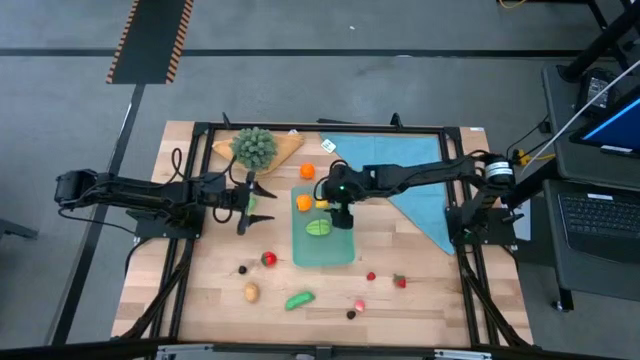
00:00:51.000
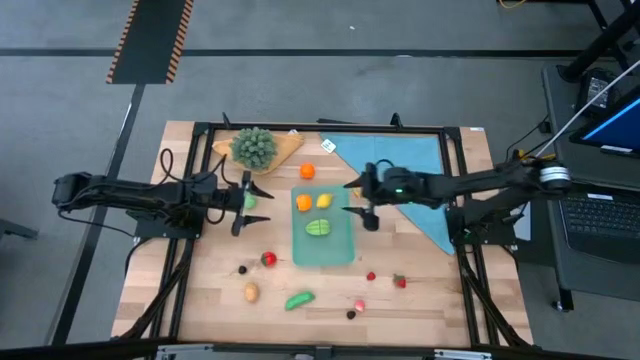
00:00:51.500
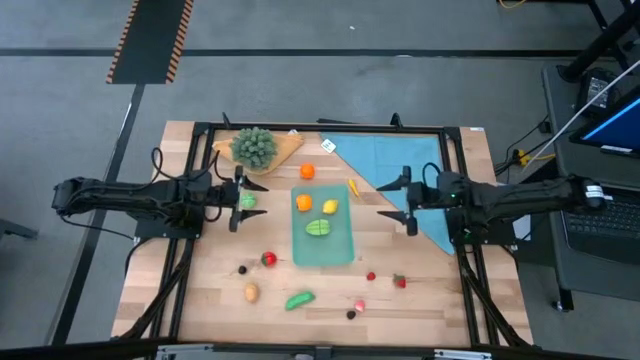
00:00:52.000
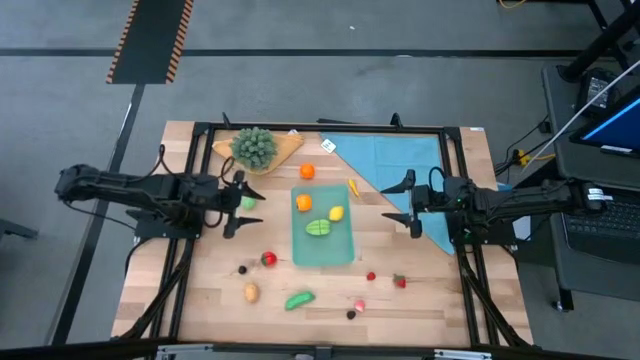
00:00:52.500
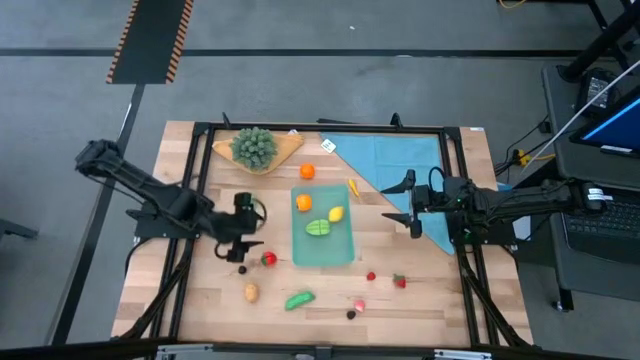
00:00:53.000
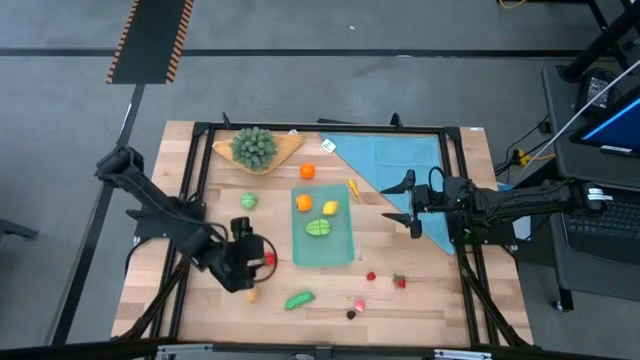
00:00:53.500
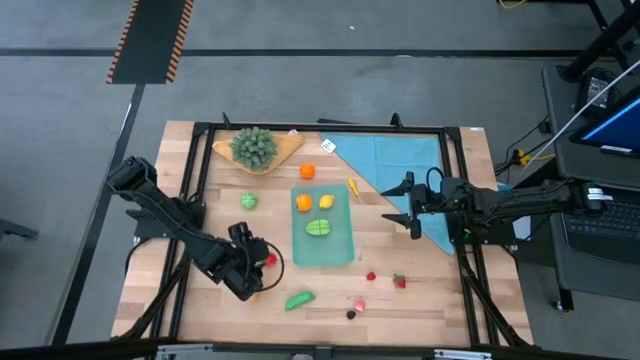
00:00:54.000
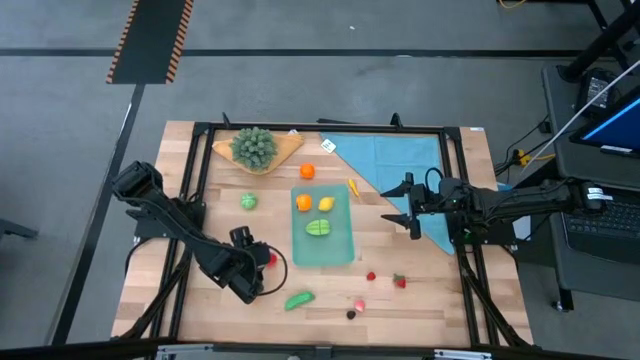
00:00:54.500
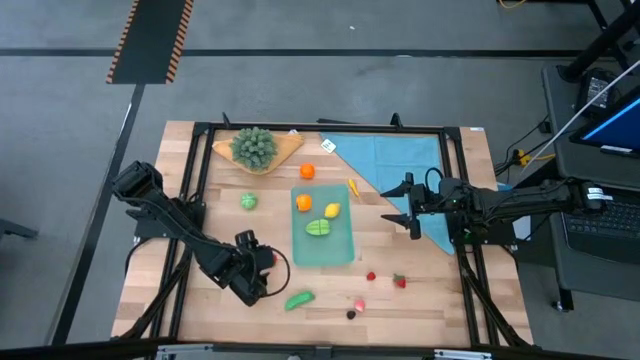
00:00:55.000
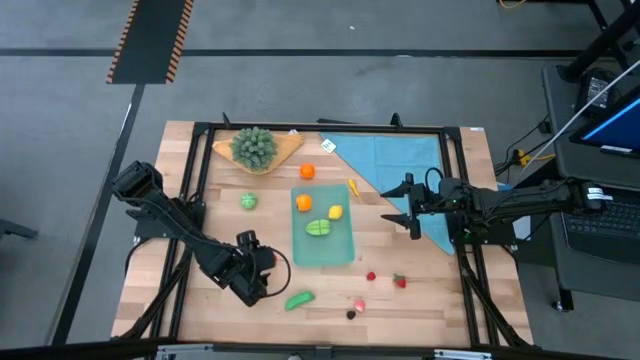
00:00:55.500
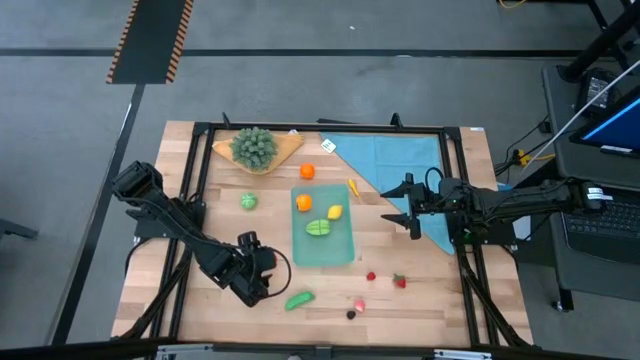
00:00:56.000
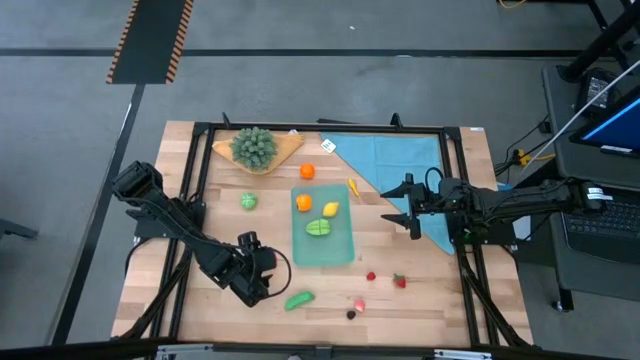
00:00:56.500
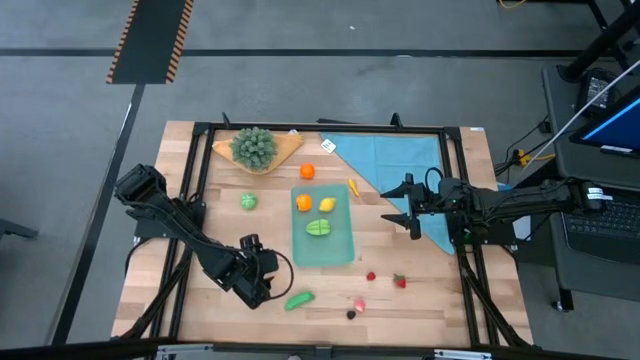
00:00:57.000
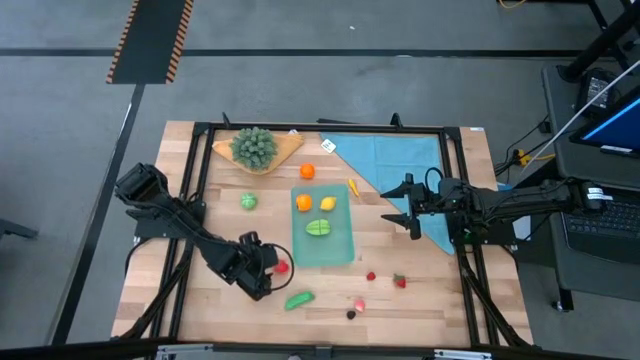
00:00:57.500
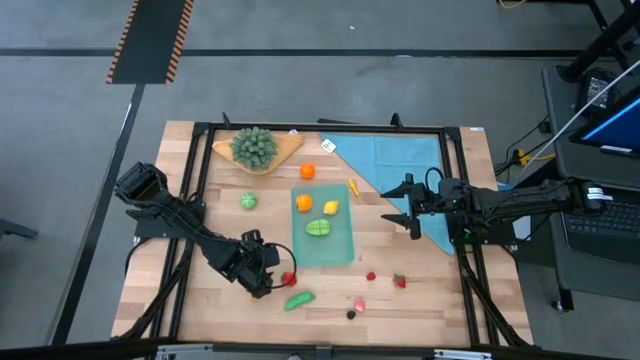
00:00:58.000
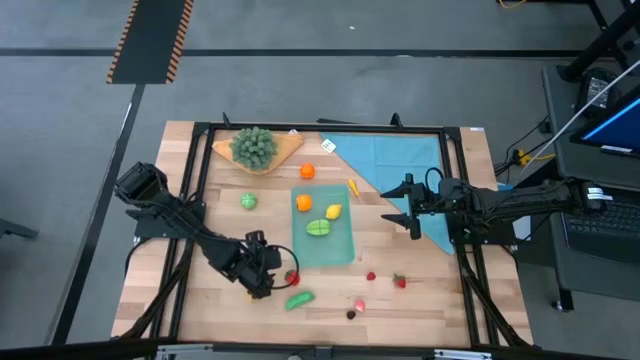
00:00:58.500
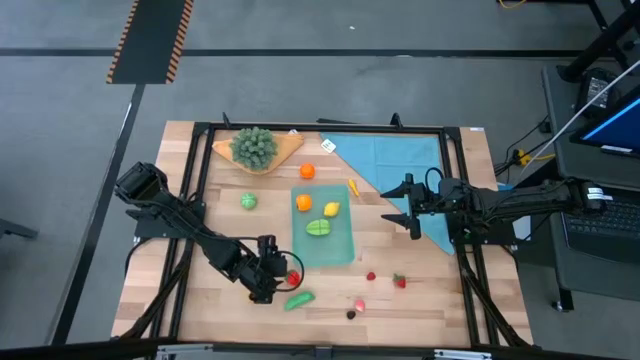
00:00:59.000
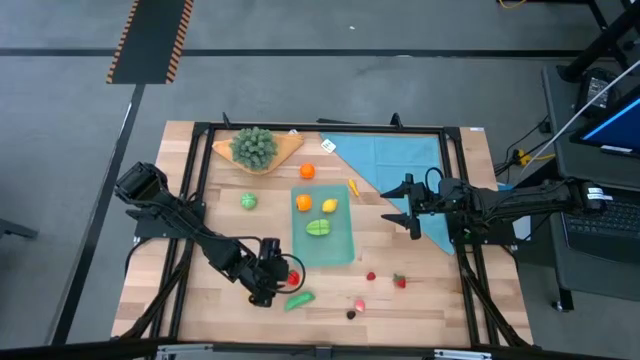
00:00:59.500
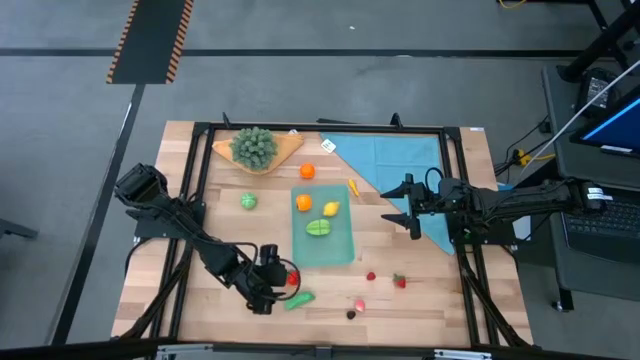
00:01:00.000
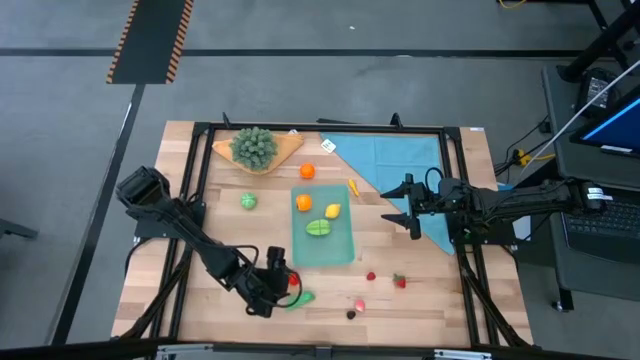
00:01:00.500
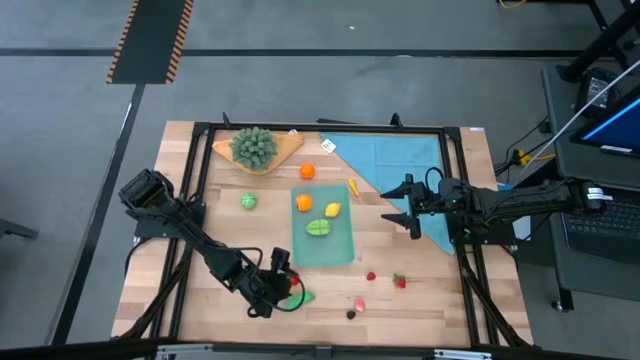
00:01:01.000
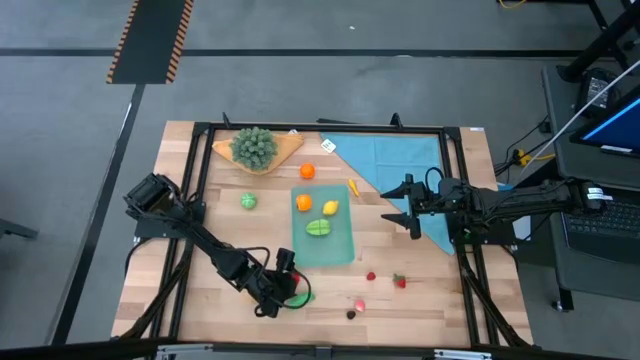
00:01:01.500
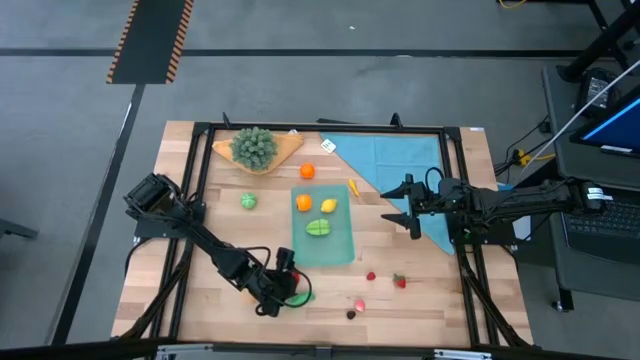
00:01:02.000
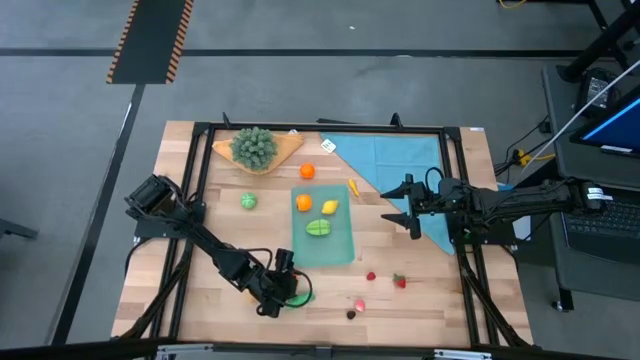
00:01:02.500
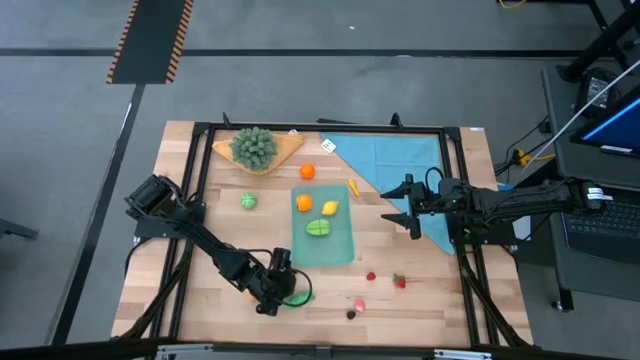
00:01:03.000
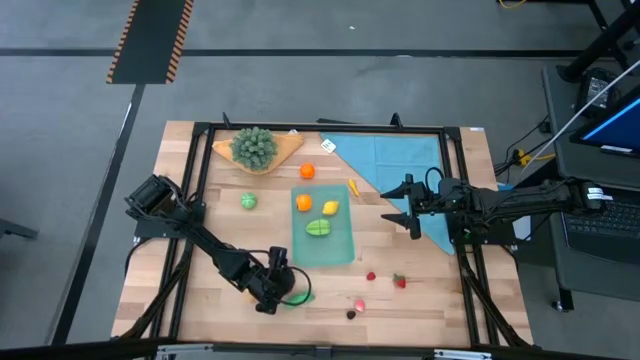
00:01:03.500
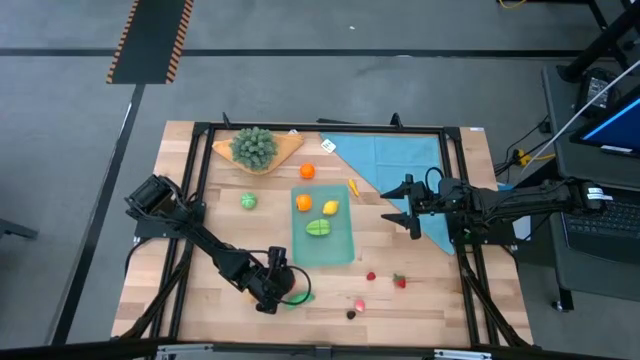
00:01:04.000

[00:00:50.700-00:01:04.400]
Task: Pick and placing Produce into tupperware
Put the large strawberry into the bin

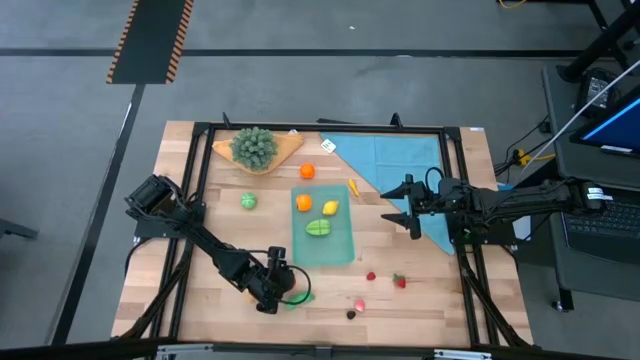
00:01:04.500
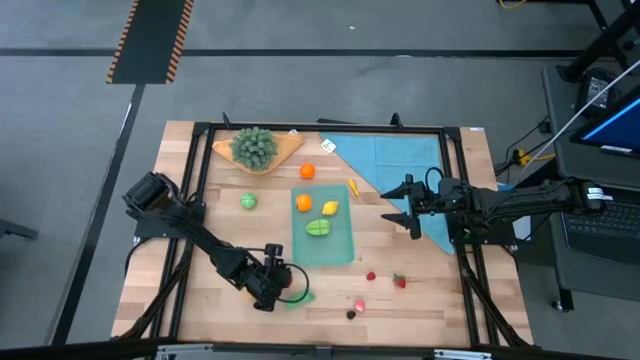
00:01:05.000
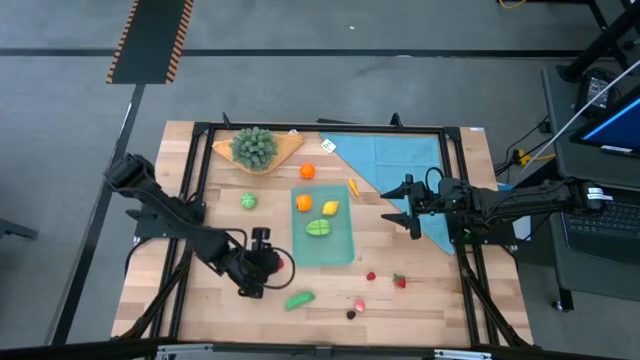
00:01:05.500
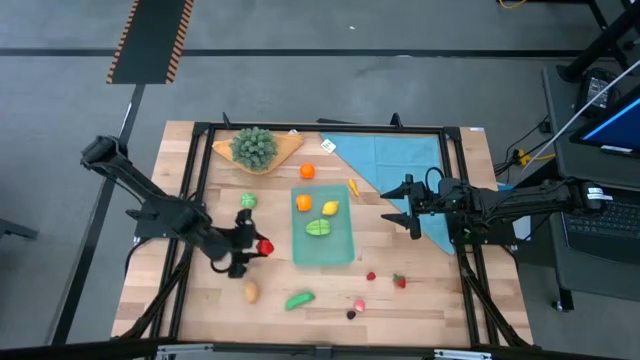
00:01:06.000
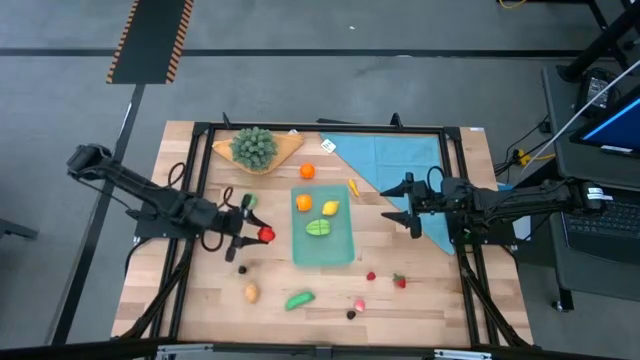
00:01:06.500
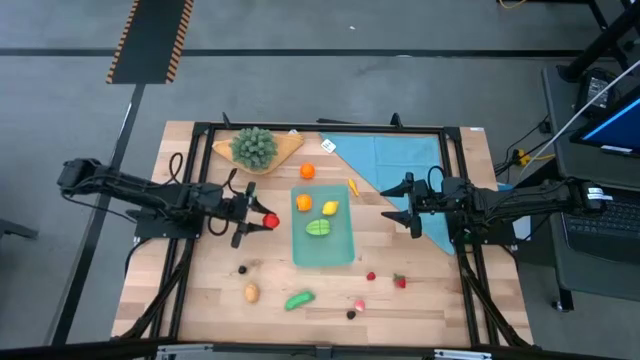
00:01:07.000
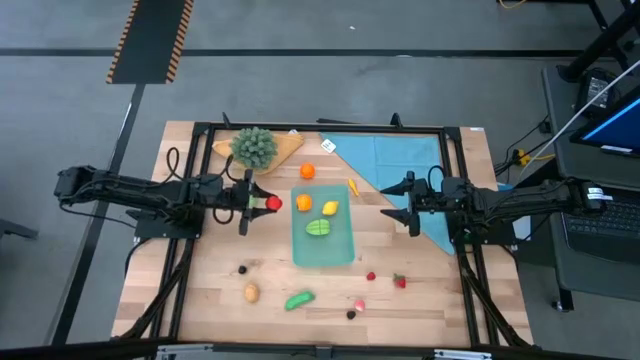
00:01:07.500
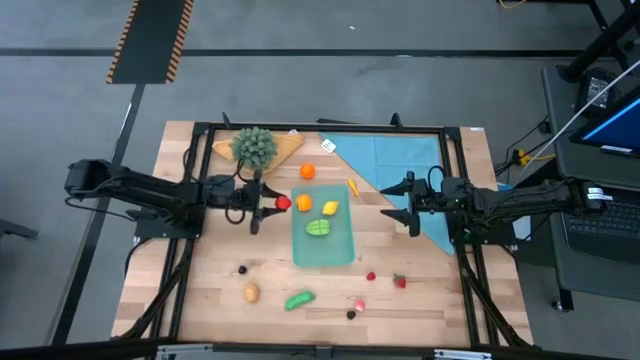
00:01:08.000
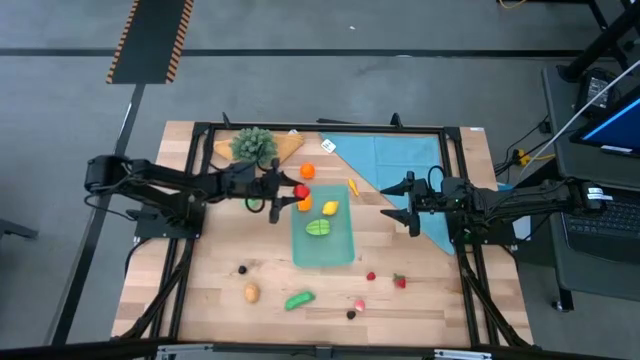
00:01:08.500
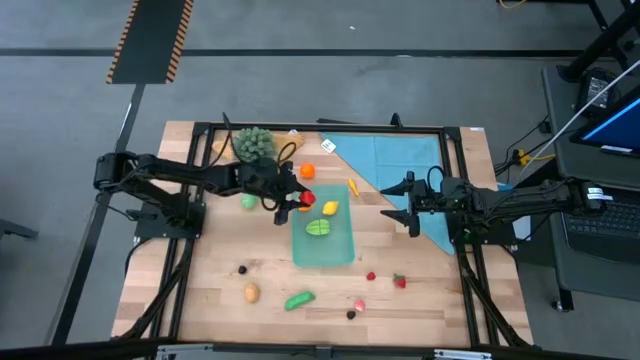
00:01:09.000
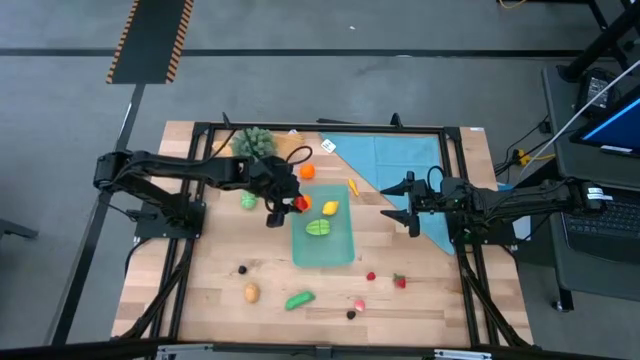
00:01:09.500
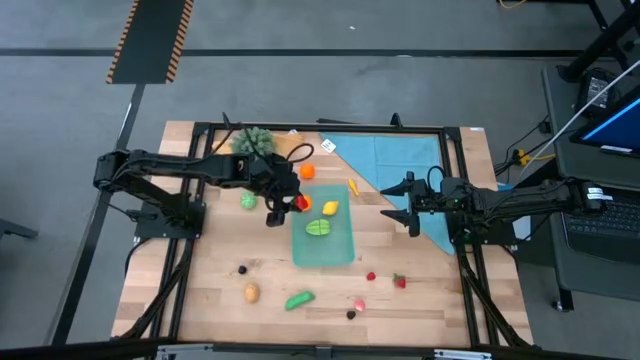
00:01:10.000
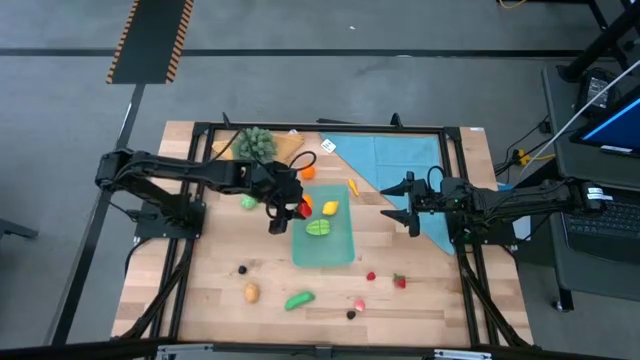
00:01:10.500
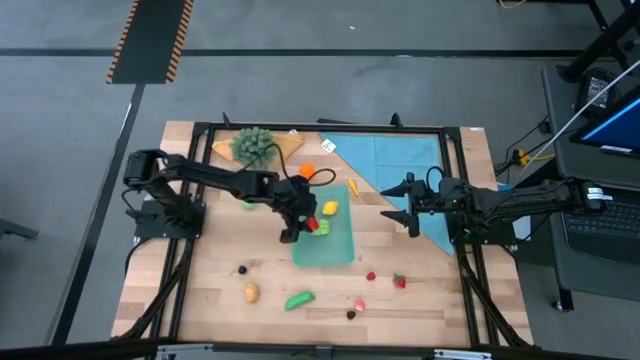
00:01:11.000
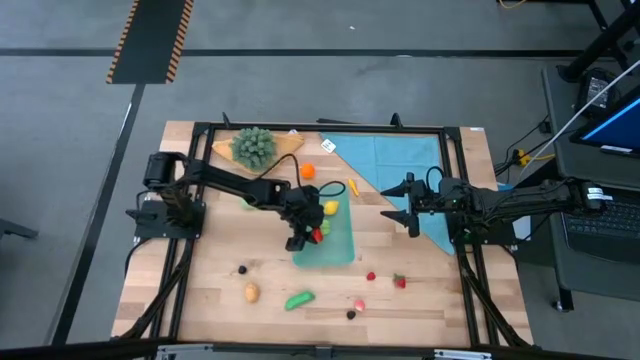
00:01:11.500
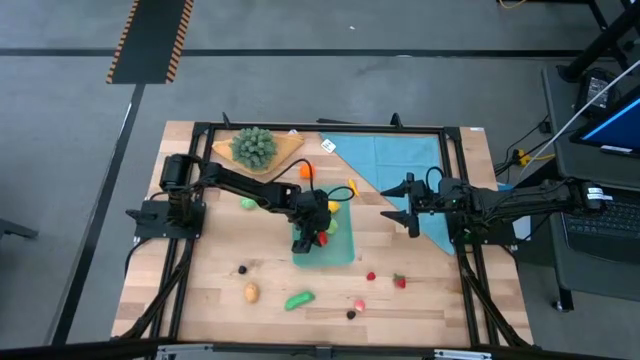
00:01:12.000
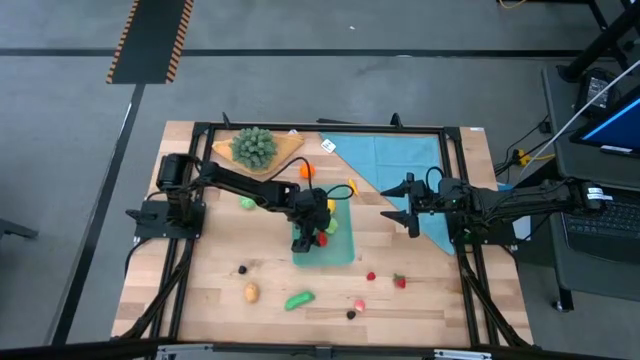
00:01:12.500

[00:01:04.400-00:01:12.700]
Put the large strawberry into the bin
